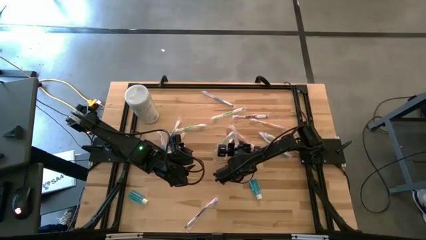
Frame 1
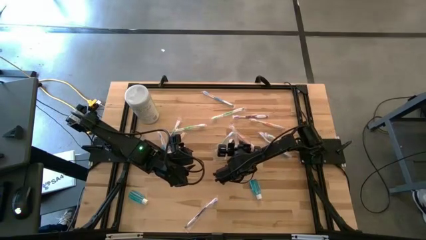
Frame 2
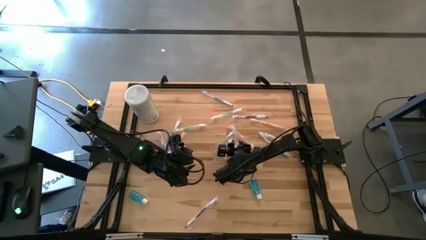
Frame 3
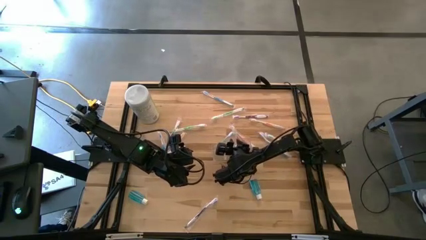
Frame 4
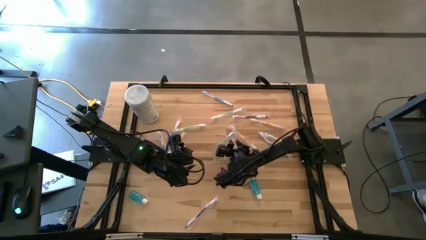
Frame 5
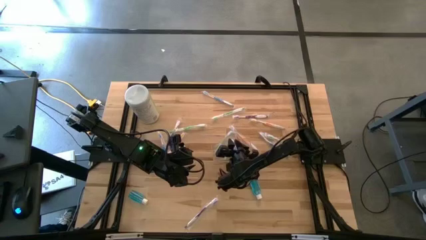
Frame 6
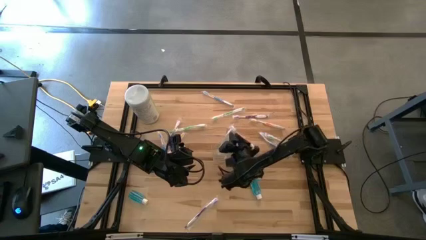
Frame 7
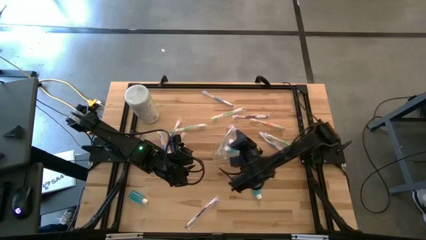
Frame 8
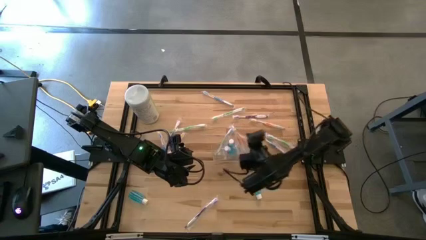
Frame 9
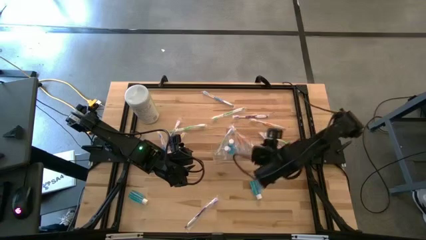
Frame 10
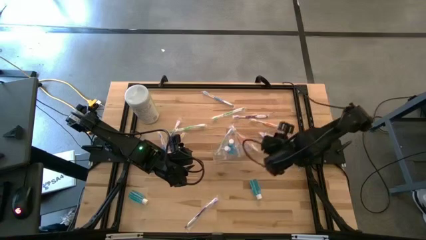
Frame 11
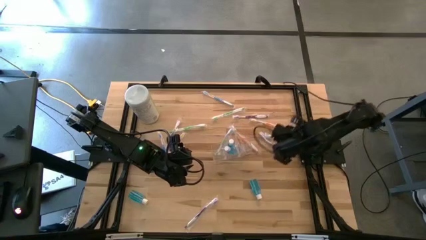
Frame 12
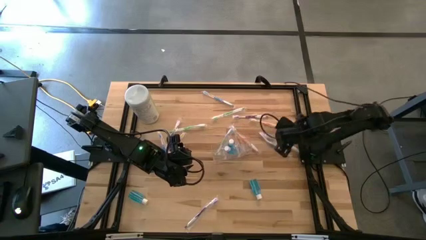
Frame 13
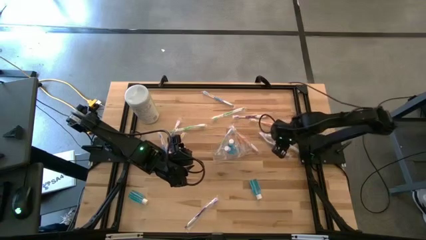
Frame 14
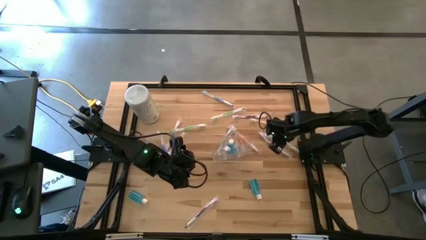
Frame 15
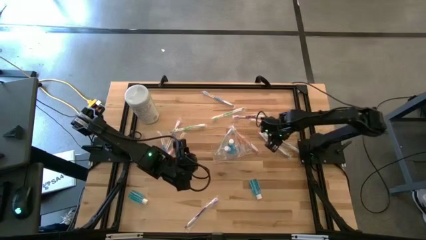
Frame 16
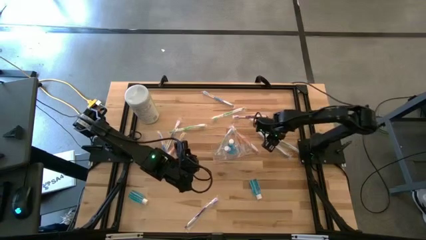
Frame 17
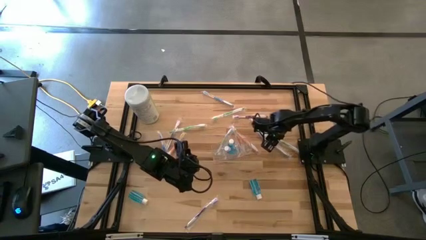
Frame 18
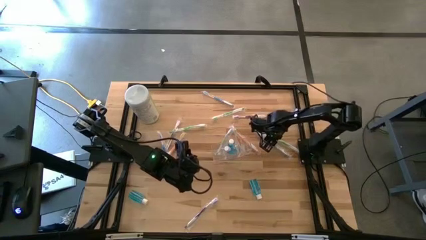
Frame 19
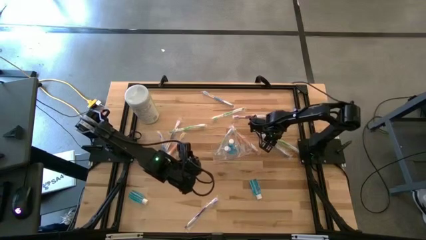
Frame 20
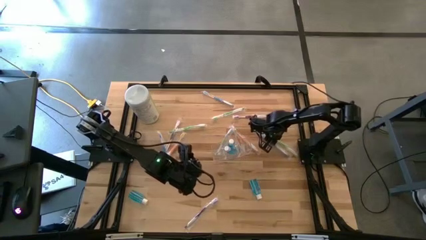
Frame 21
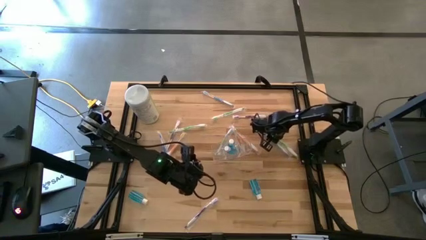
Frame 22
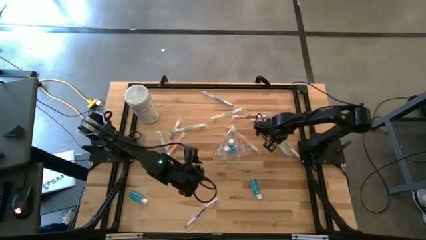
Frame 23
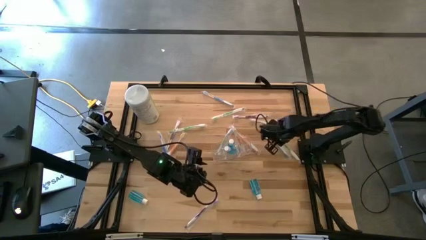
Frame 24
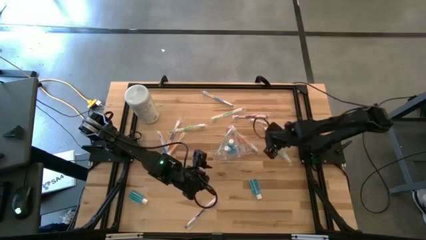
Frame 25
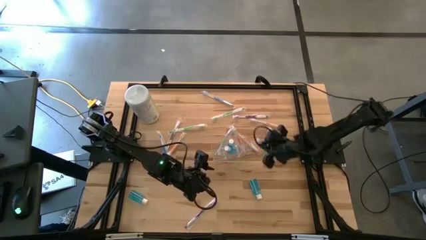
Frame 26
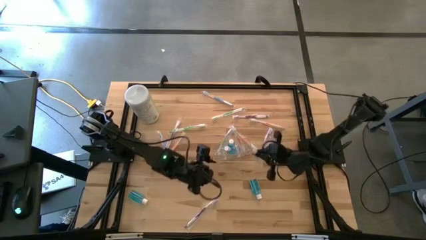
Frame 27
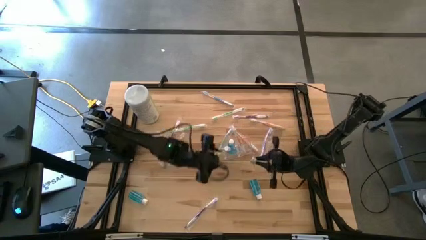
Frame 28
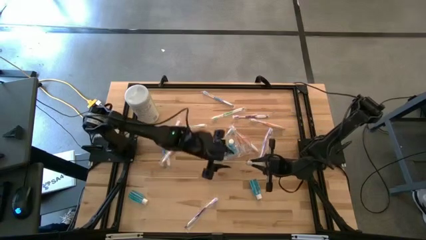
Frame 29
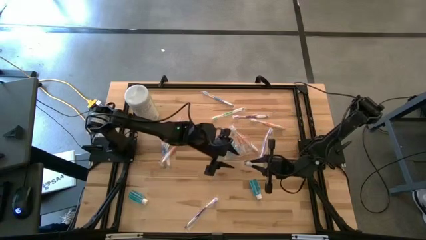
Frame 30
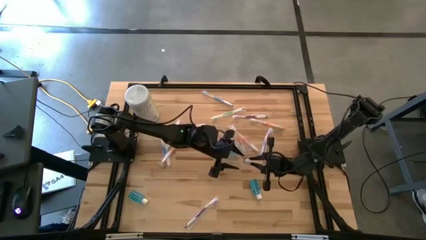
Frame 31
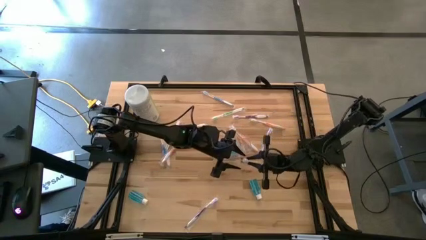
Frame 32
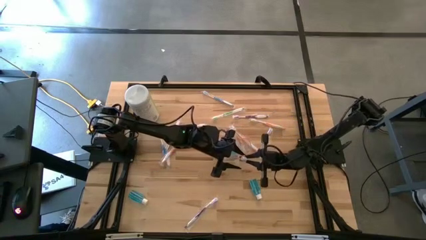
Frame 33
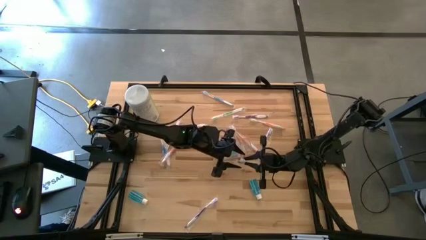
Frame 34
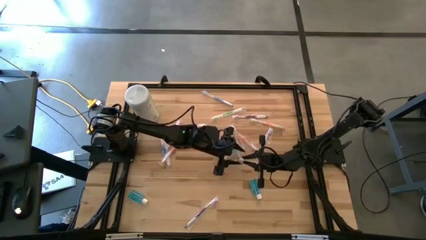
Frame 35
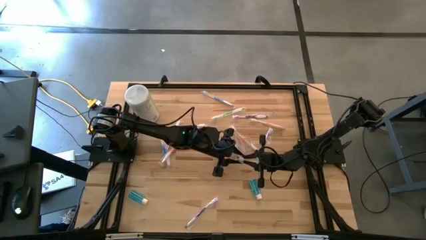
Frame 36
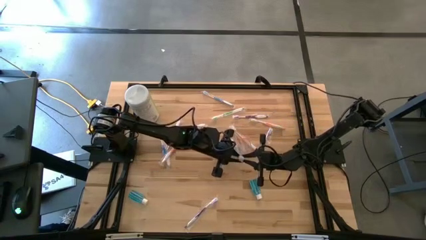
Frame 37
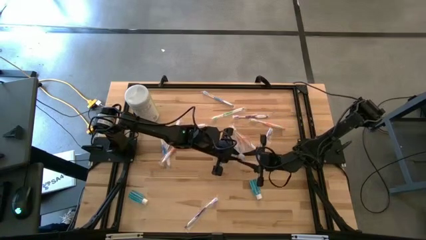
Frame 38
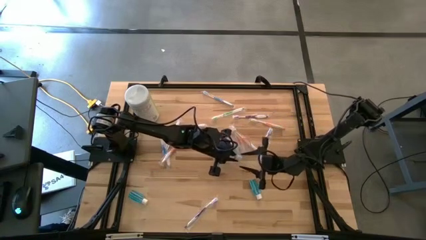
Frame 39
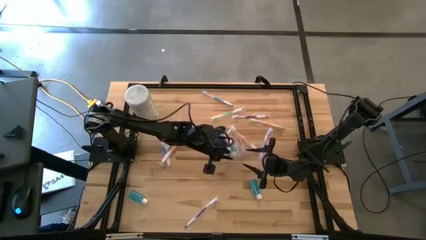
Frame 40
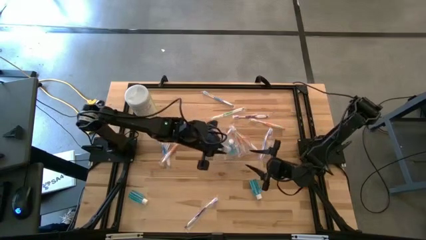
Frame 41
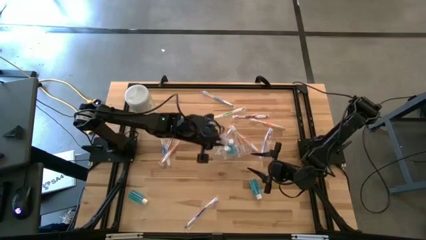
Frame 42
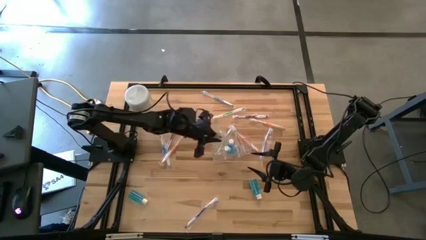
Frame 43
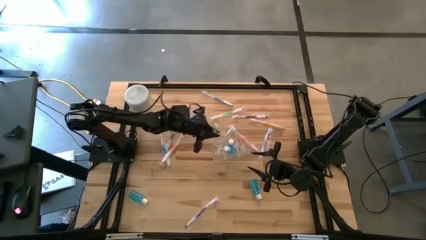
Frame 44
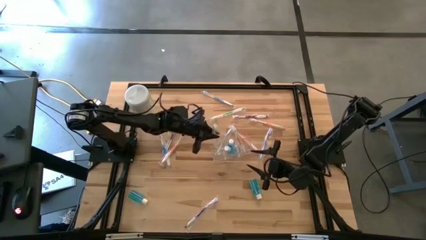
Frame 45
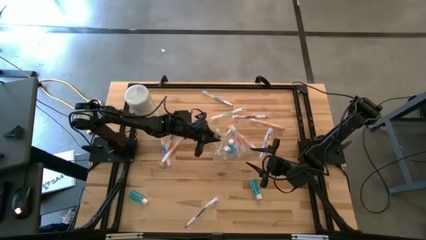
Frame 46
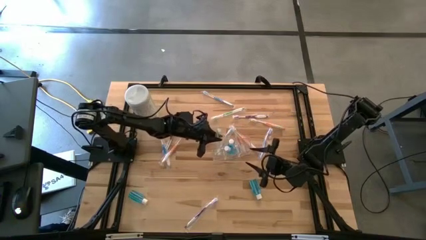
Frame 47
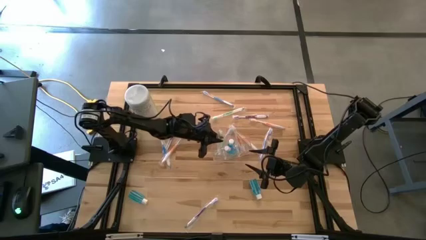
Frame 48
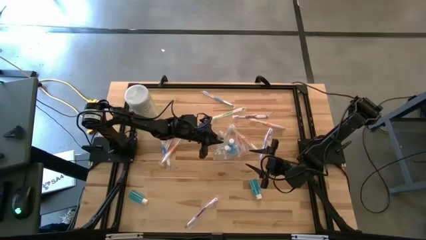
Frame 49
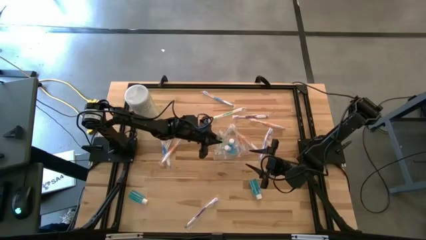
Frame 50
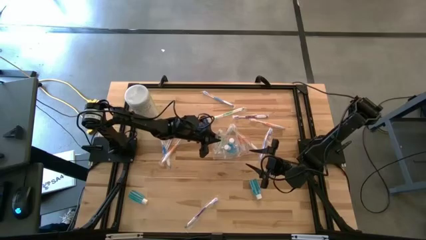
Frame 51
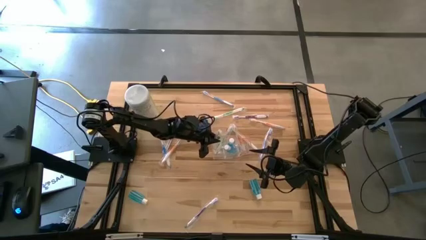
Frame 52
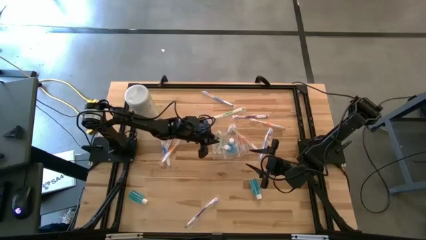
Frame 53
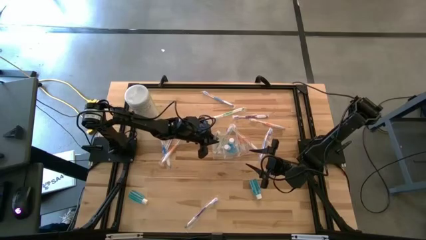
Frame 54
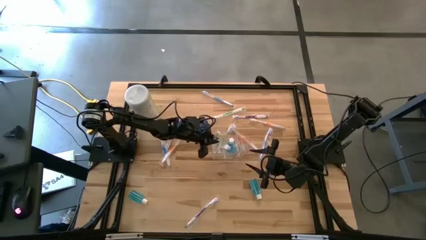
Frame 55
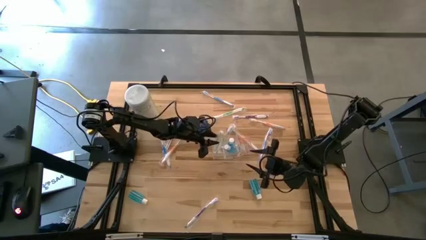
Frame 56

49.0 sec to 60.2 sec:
Task: Pick & Place toothbrushing station
Put the green toothbrush into the transparent organizer

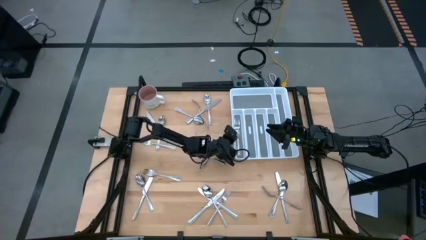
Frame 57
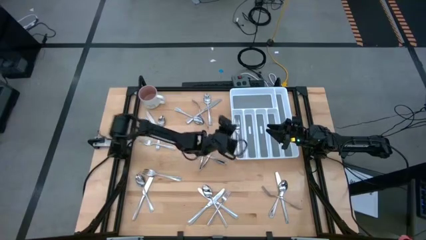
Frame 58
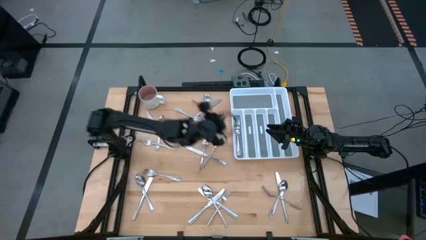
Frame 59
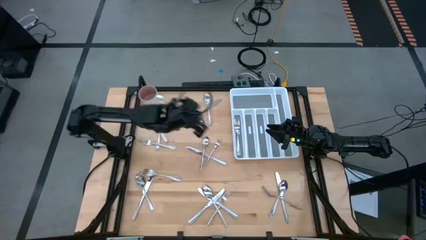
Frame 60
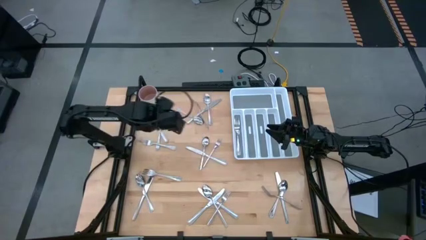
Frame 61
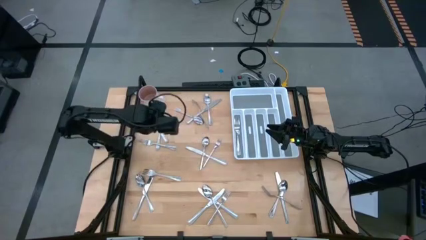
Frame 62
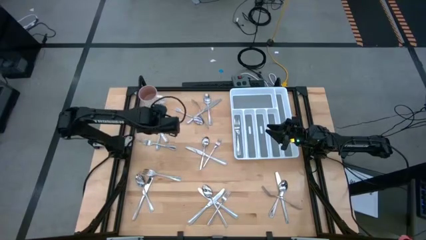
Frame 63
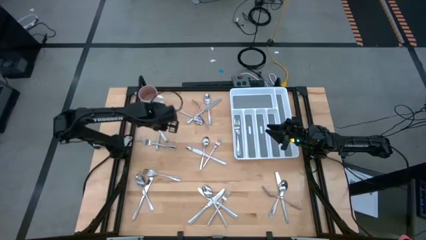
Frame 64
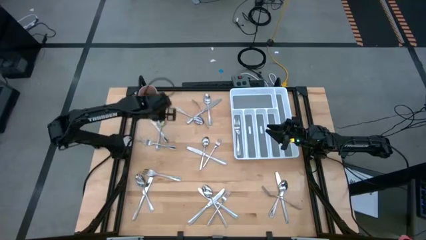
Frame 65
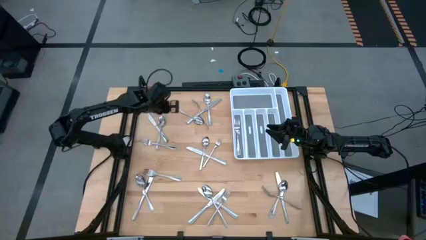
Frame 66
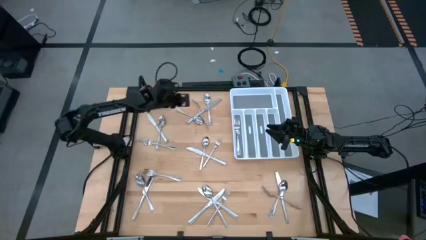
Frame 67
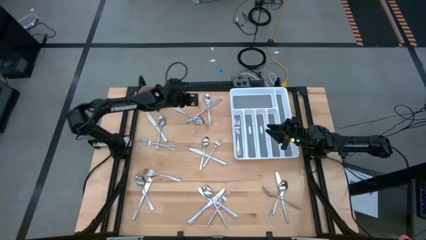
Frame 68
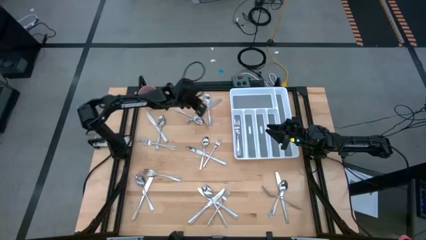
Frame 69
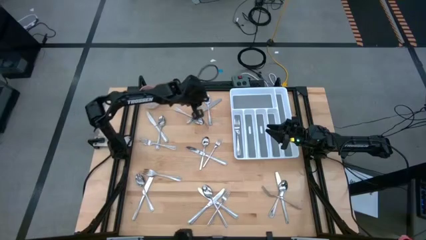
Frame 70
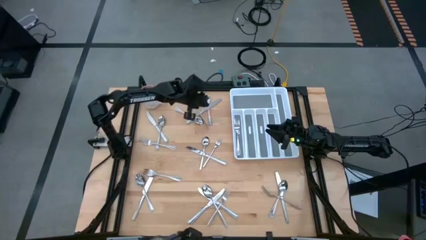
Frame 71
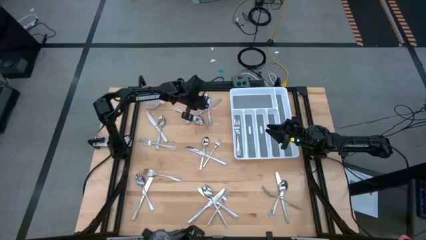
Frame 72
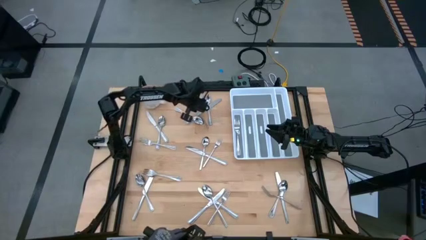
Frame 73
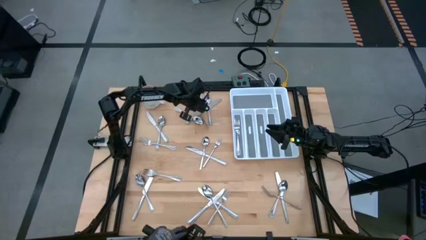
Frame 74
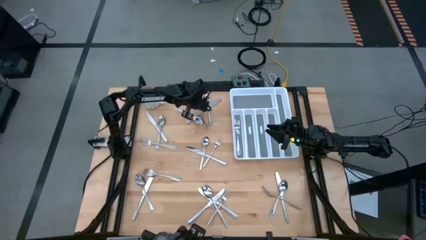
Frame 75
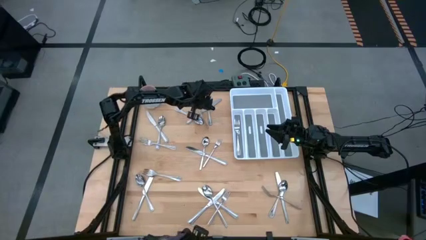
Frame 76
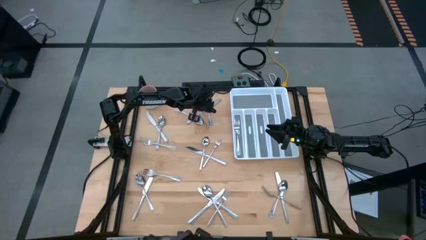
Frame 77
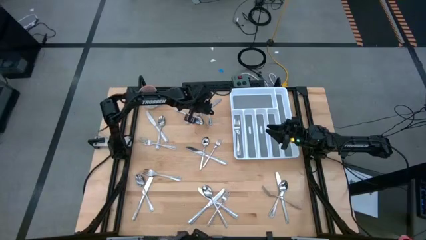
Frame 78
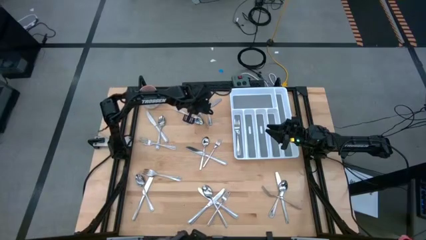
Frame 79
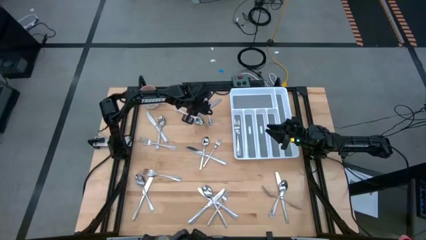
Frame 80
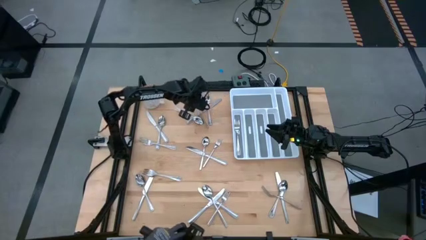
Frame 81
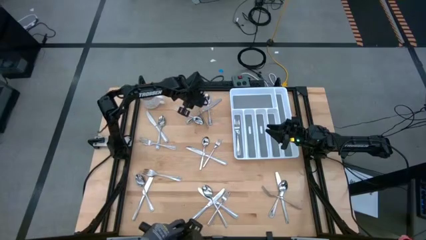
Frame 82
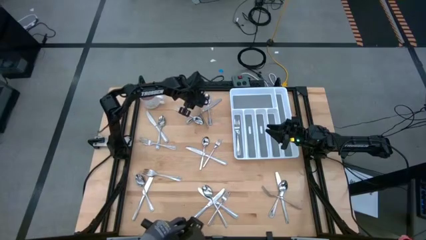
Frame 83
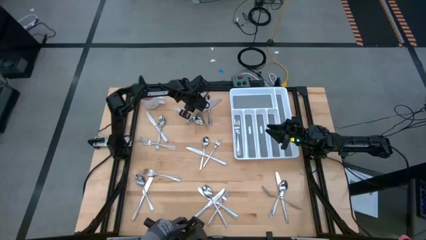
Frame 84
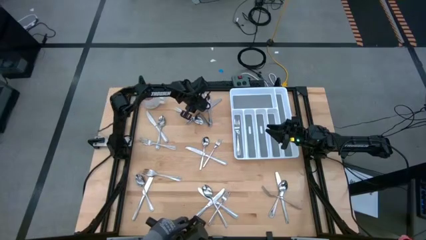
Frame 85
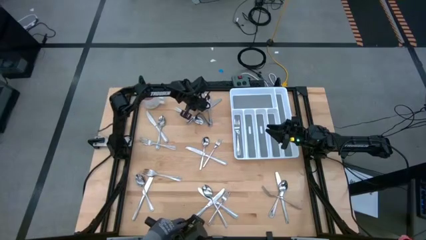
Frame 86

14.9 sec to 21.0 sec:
Task: Sort silverware
Put the silver fork into the silverware tray
